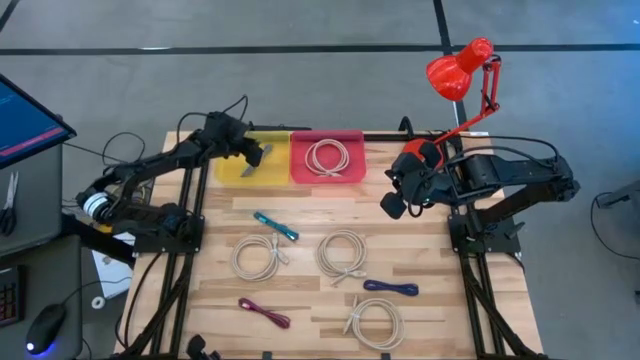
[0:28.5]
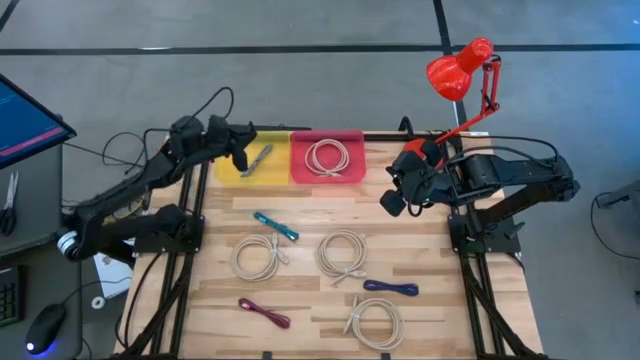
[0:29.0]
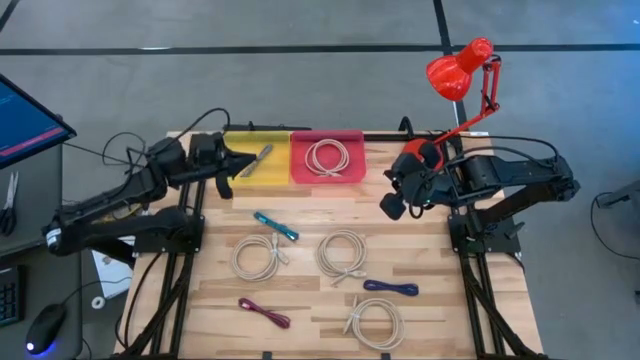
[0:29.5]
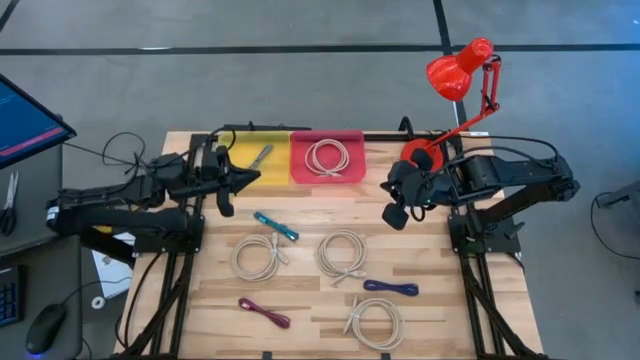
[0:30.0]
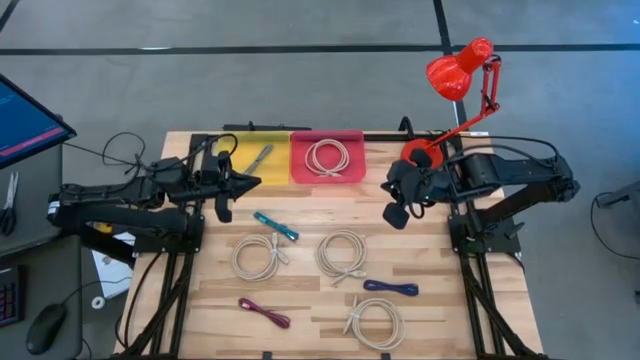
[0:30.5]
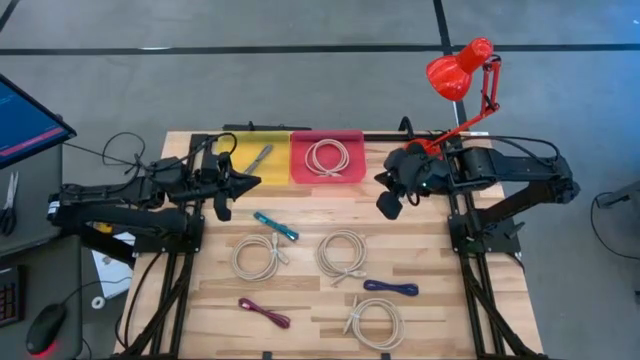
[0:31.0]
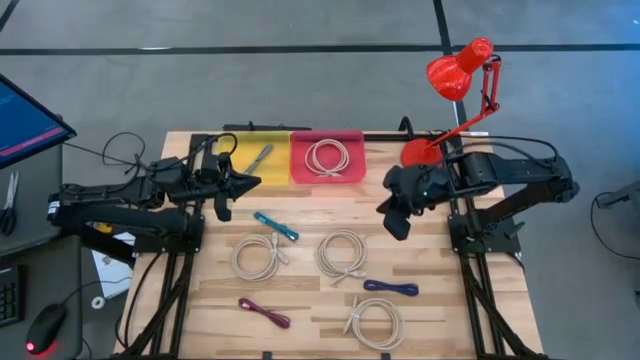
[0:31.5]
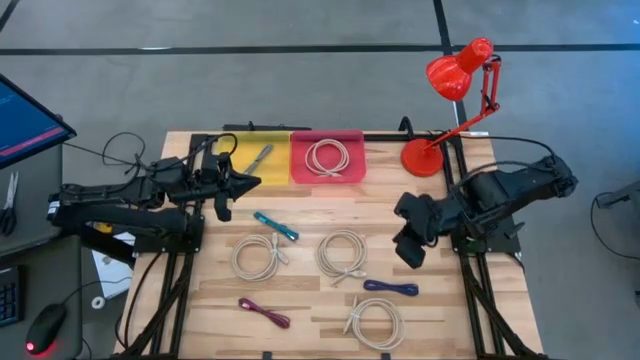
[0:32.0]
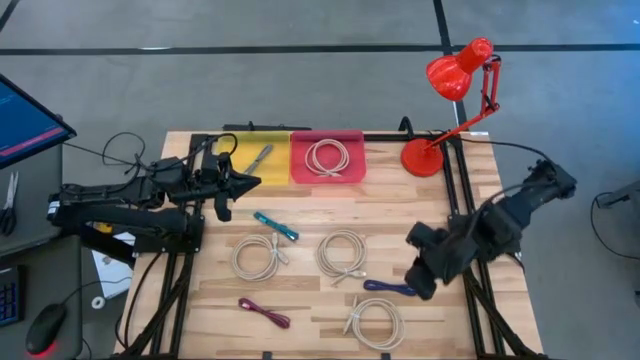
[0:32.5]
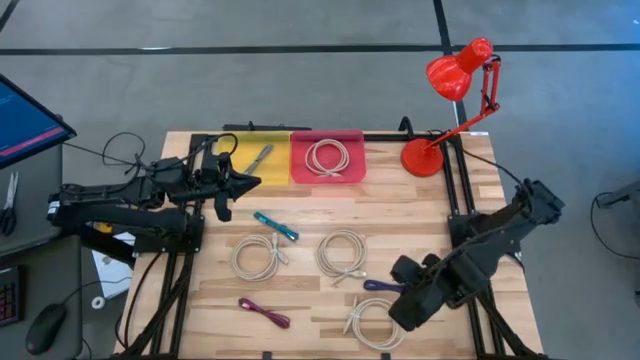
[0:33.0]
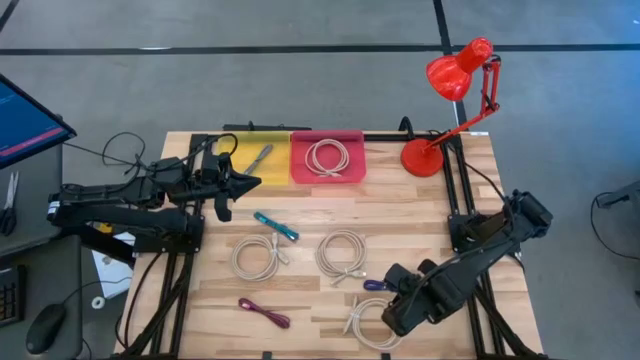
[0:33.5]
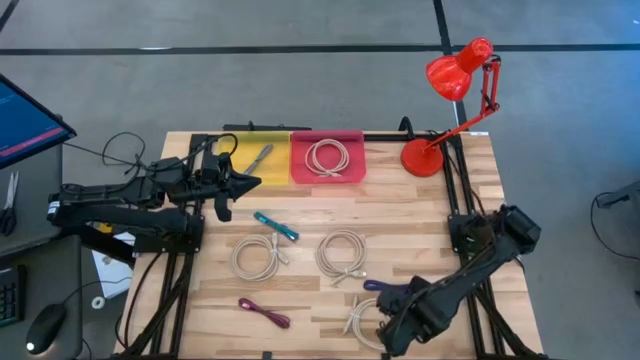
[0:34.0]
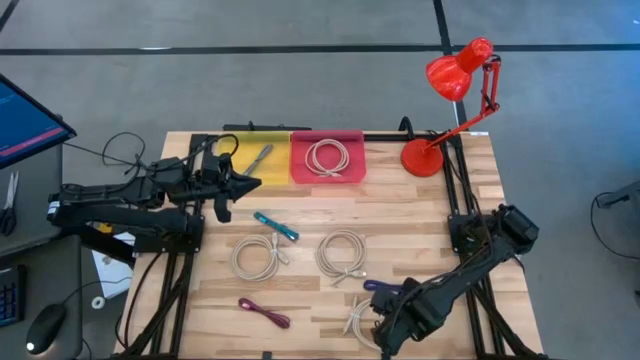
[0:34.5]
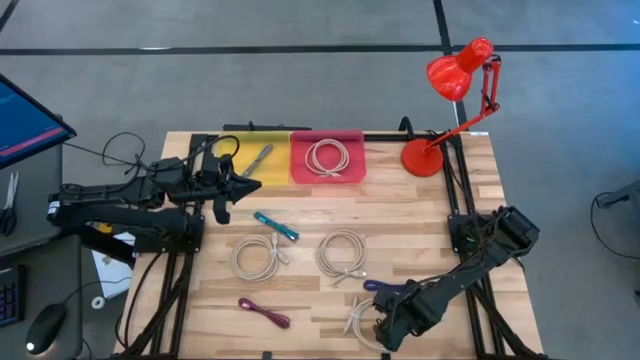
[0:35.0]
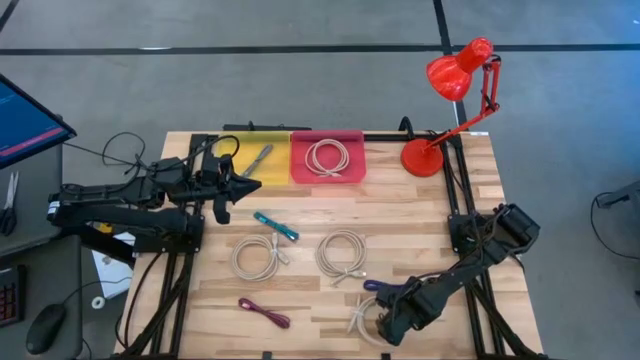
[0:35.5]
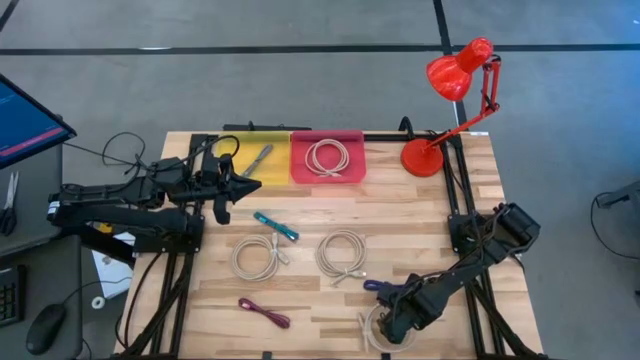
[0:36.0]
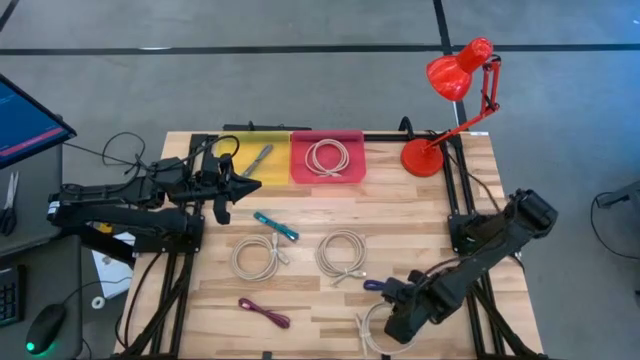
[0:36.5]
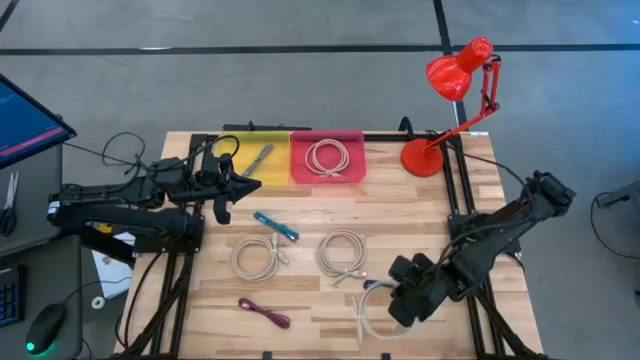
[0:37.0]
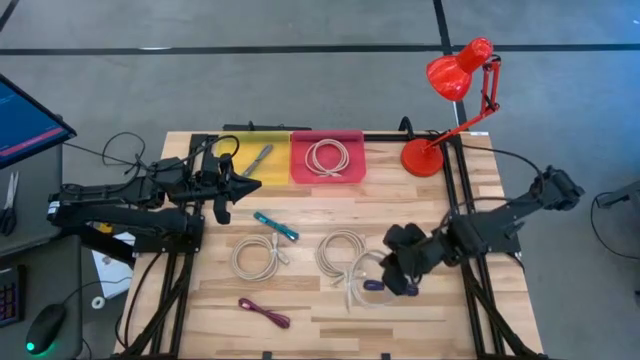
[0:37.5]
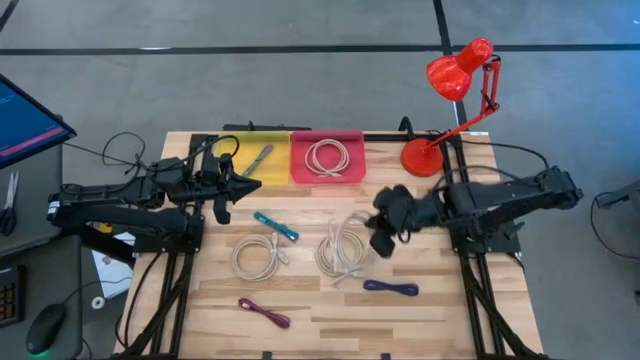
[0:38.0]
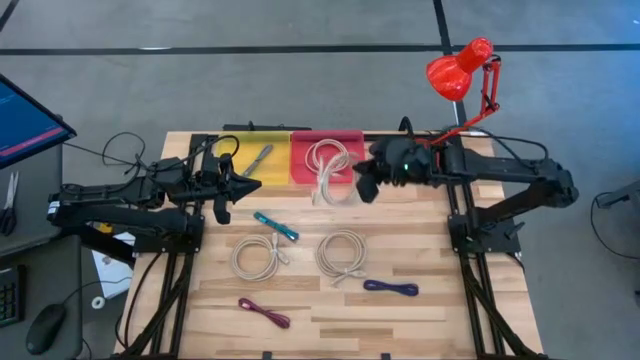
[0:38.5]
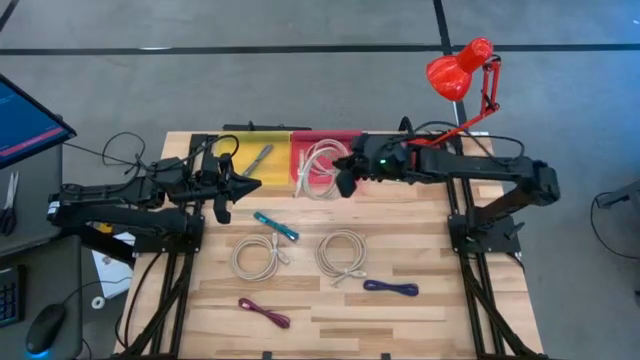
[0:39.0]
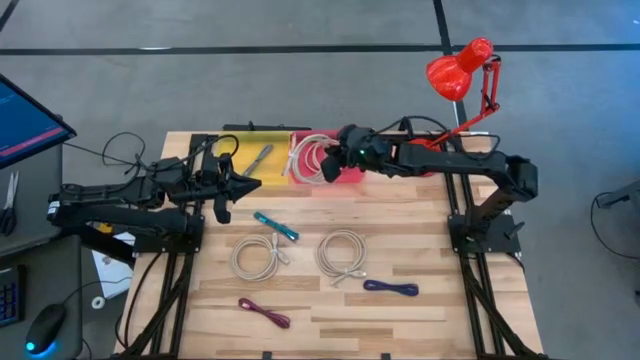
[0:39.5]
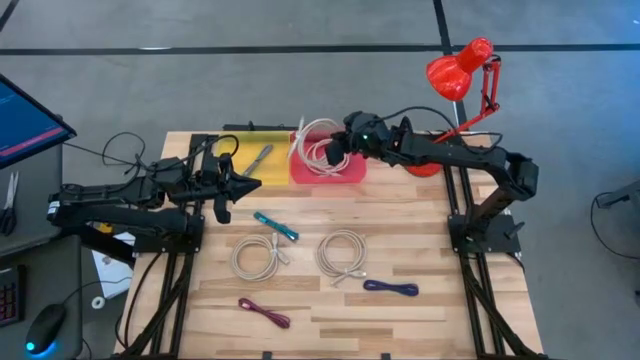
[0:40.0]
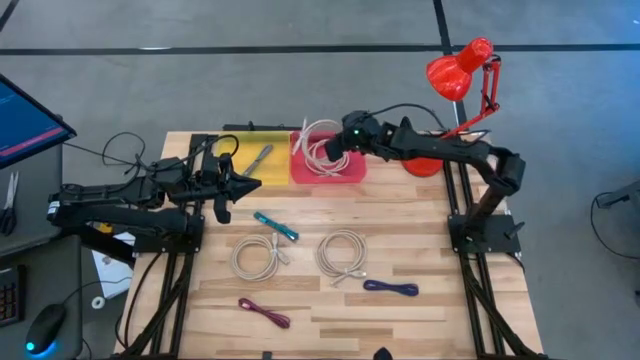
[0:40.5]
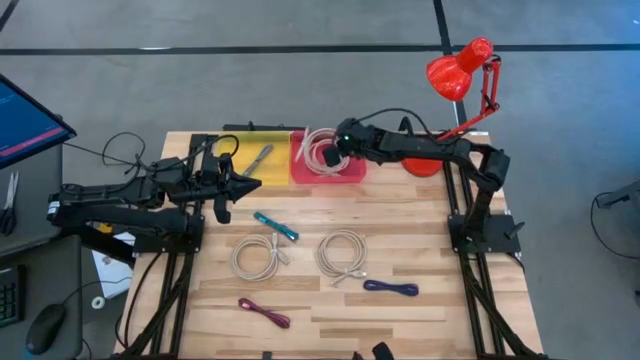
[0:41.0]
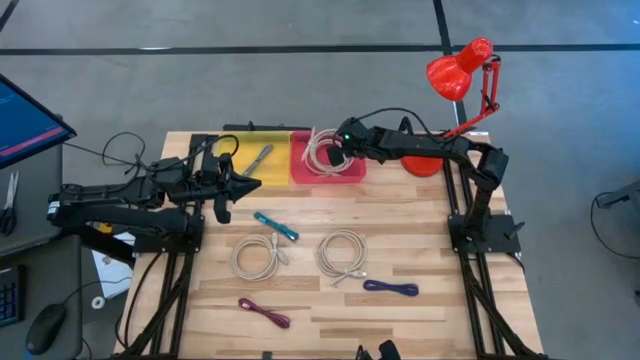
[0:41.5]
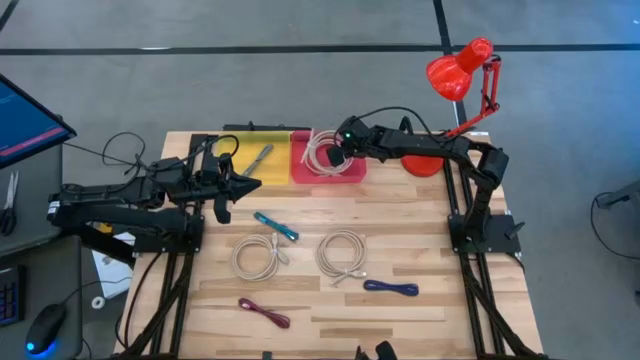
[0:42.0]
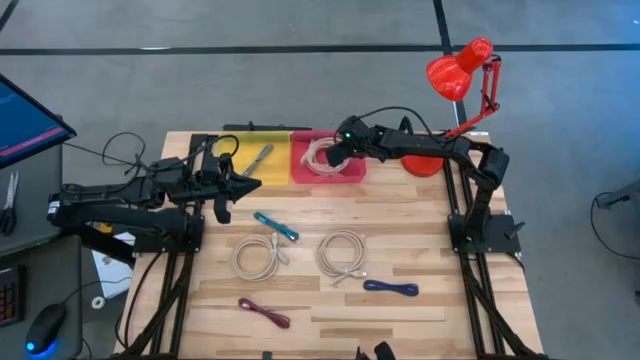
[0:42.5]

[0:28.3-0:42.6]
Task: Pick & Place USB Port
Put the brown HDMI cable into the pink bin

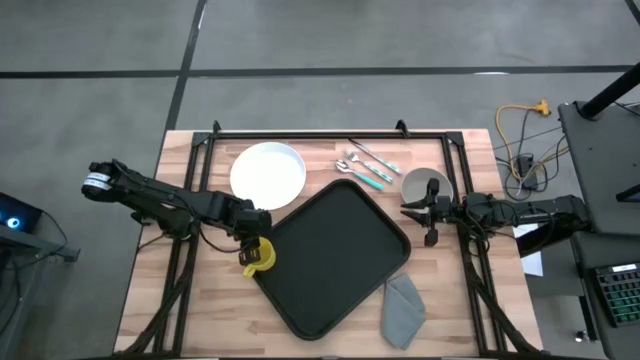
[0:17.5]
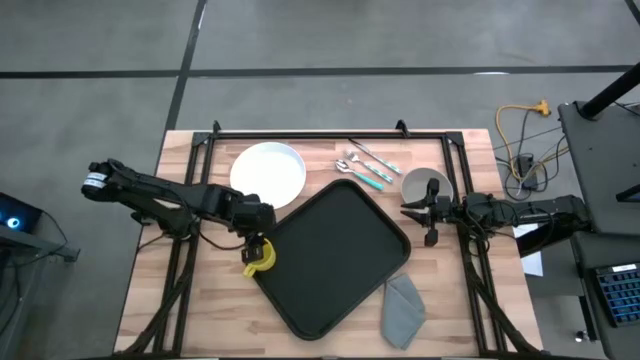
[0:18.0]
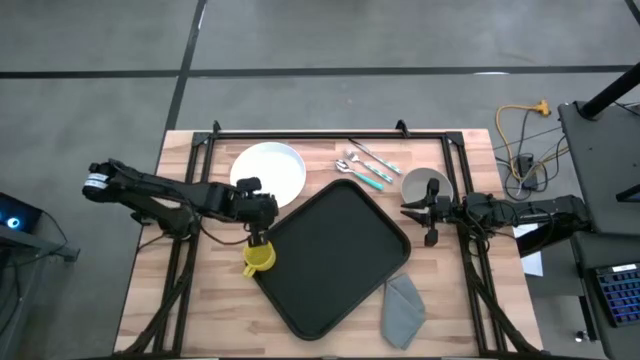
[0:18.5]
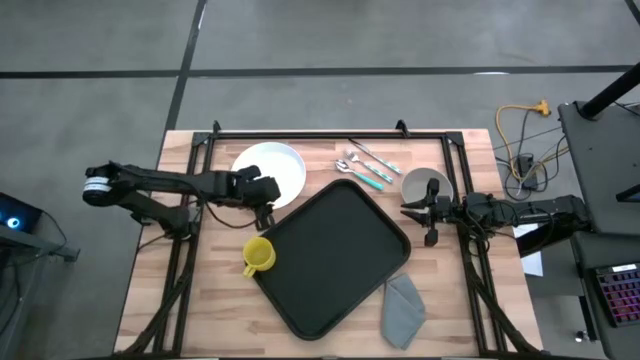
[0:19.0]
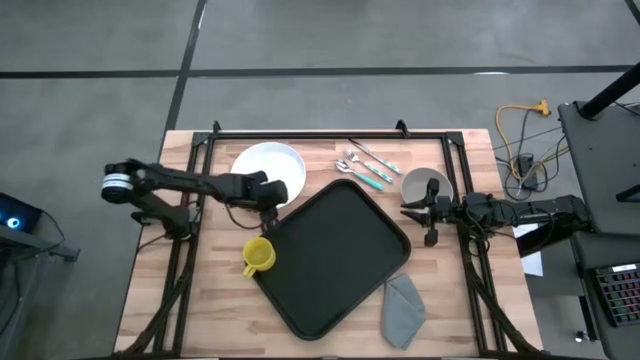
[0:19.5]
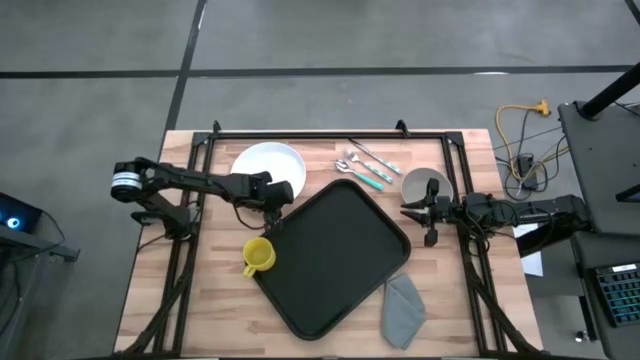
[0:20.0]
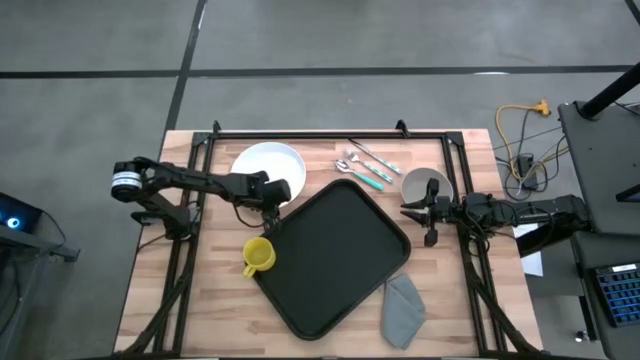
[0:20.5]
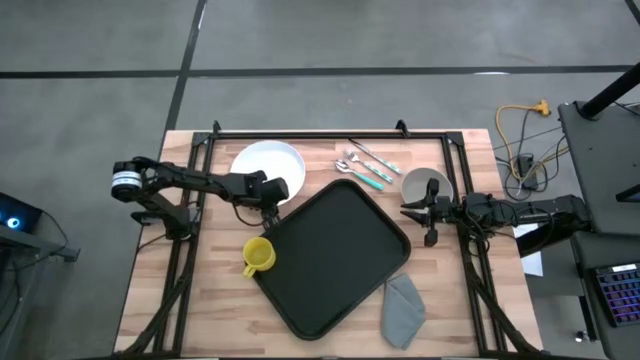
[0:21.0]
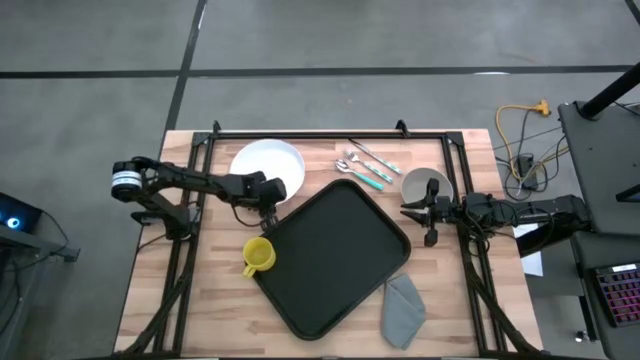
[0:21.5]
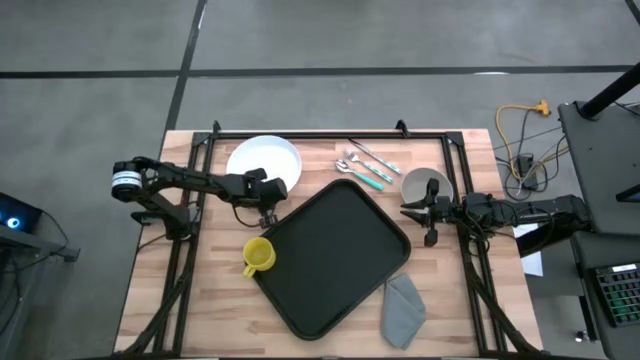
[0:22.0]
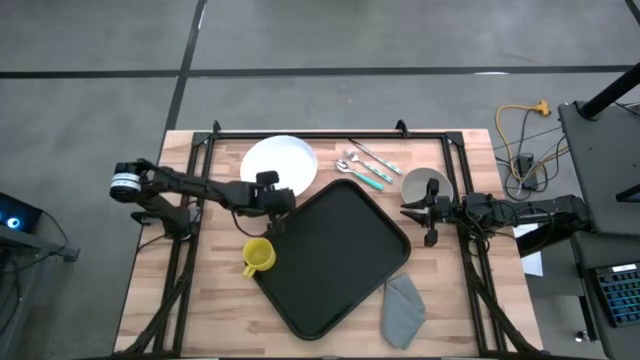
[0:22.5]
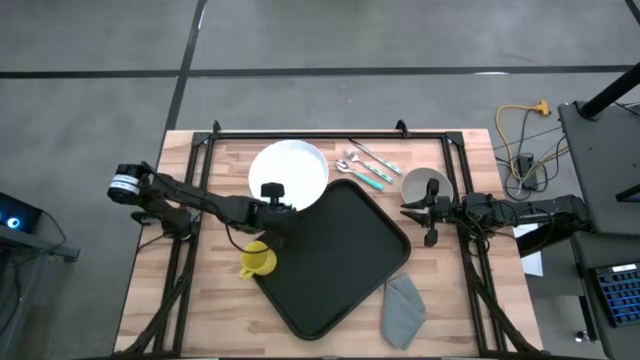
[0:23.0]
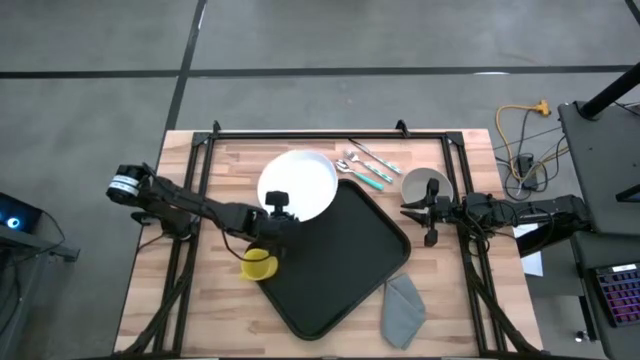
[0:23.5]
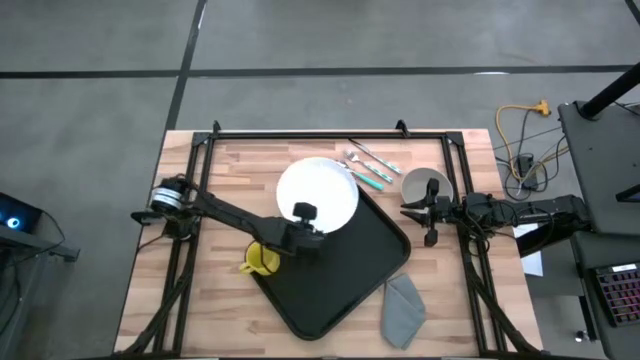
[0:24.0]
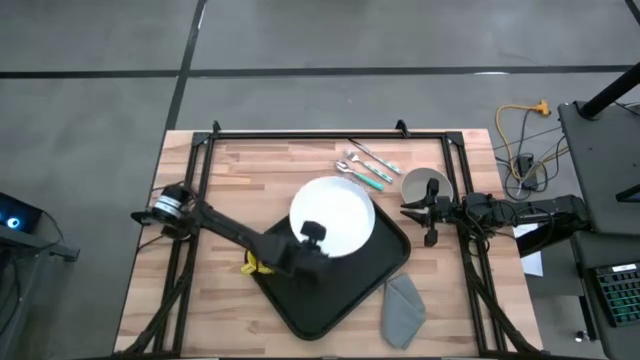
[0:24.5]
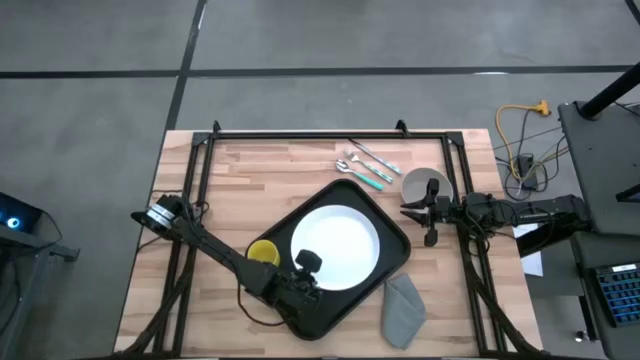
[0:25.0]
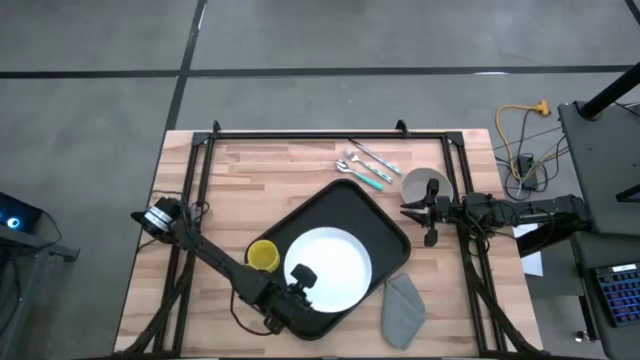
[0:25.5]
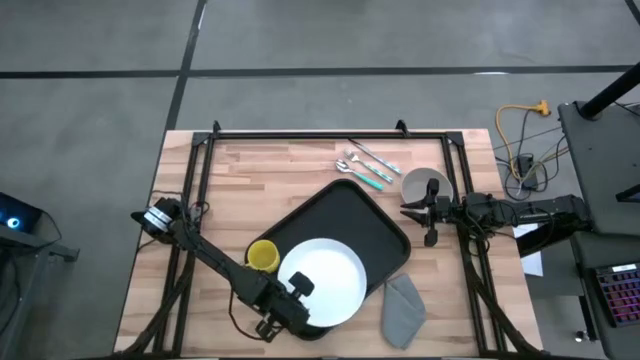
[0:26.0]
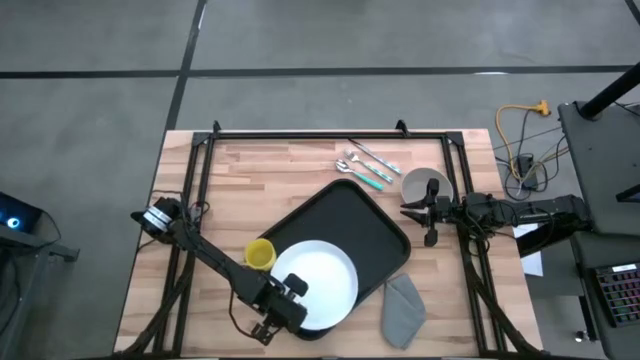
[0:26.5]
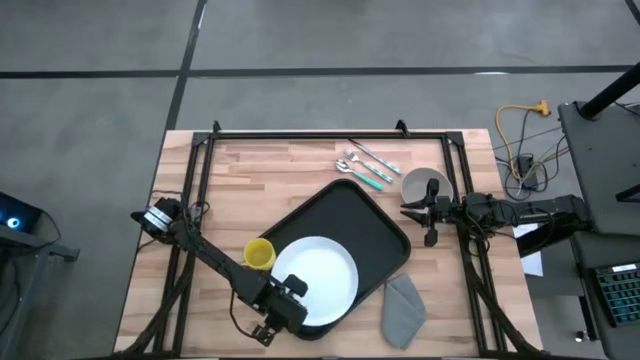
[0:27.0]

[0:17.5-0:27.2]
Task: Set up tray
Put the white plate on the black tray below the yellow cup
